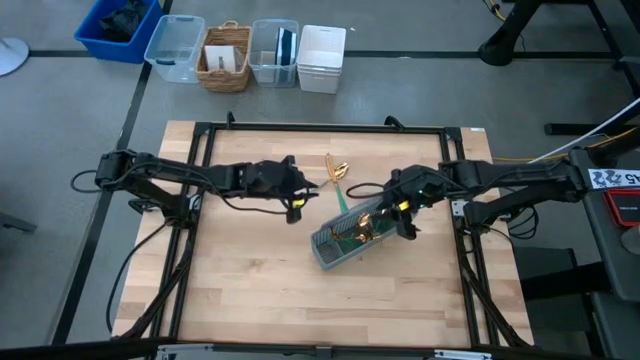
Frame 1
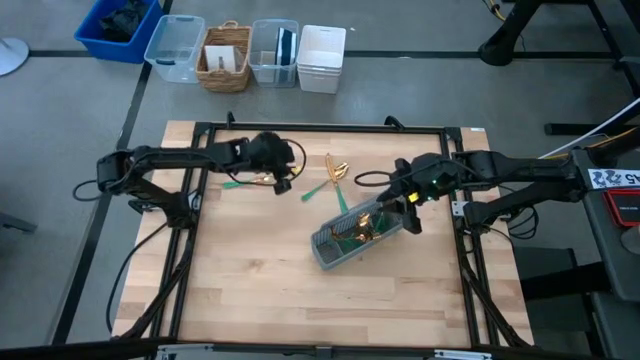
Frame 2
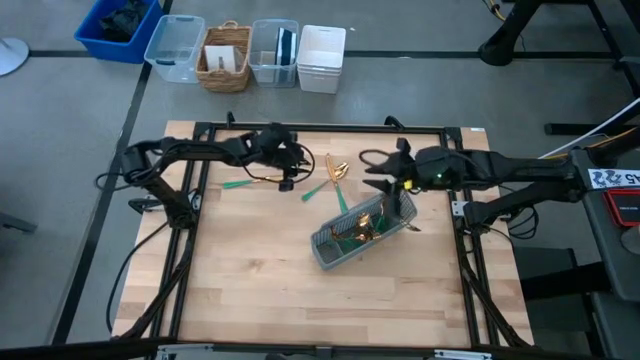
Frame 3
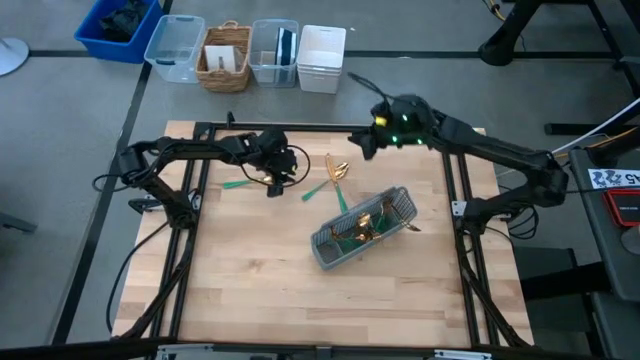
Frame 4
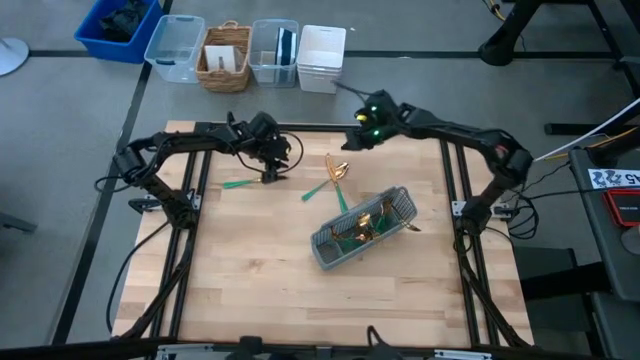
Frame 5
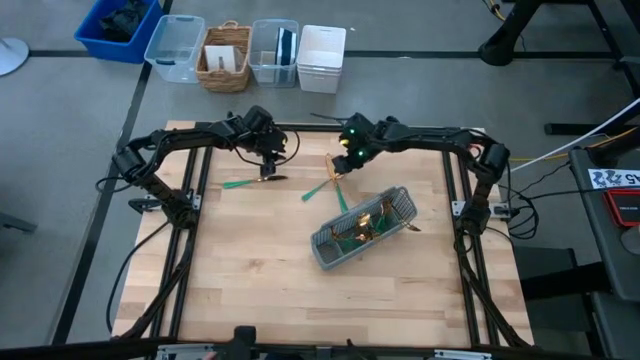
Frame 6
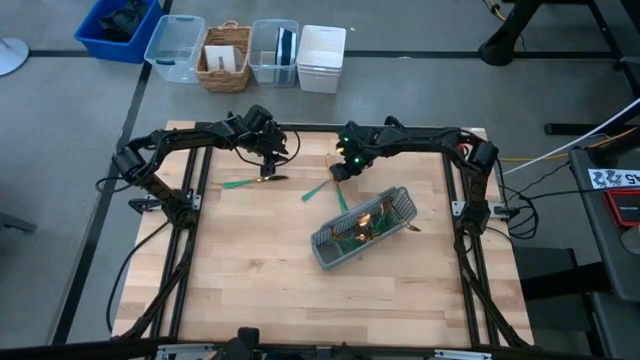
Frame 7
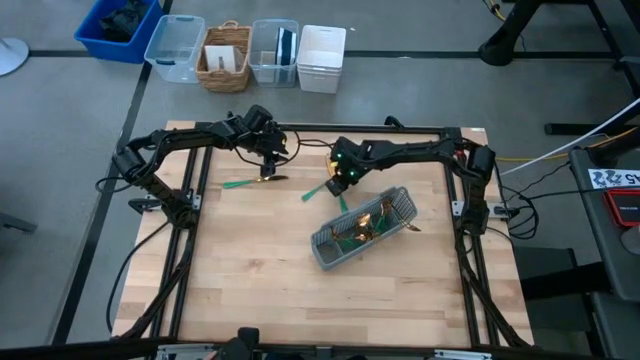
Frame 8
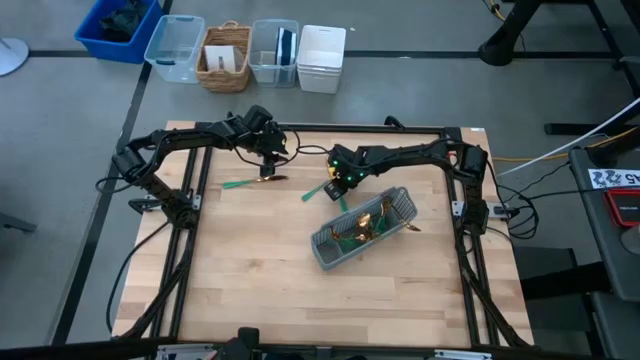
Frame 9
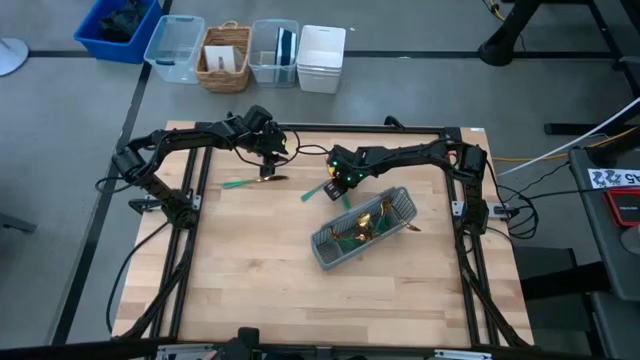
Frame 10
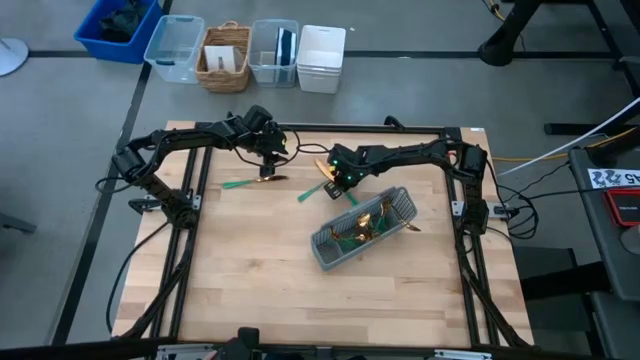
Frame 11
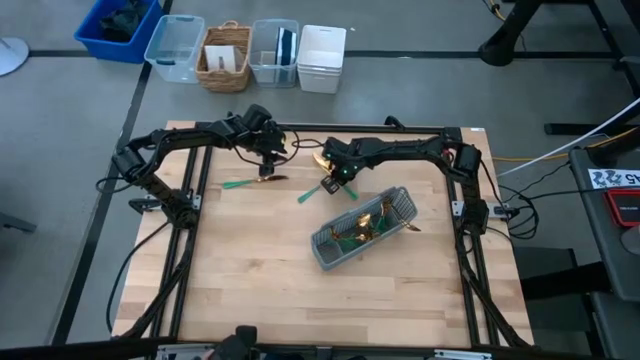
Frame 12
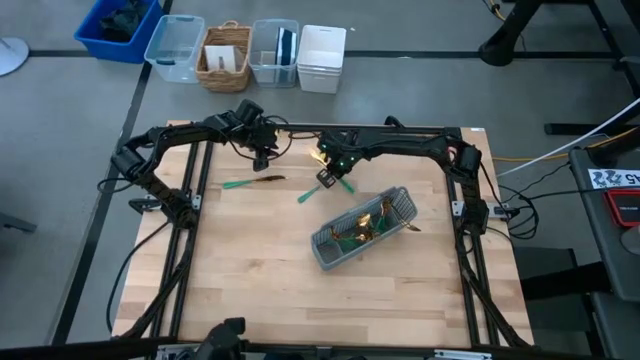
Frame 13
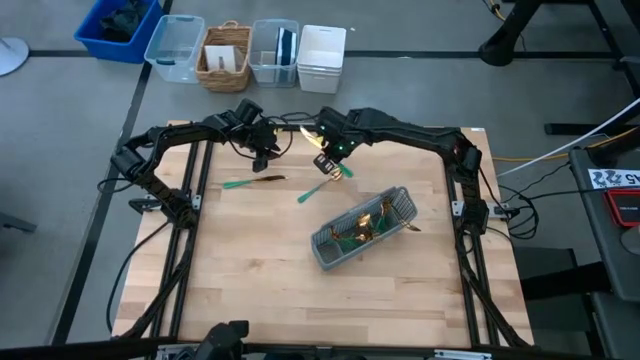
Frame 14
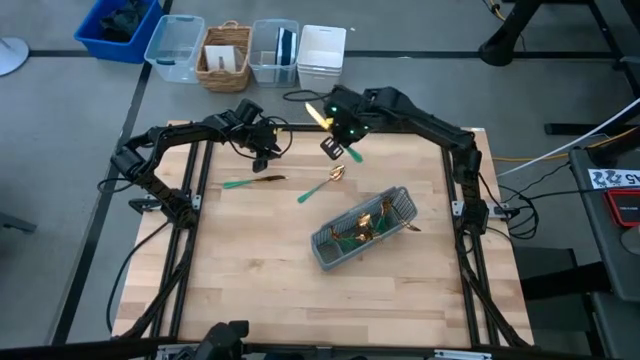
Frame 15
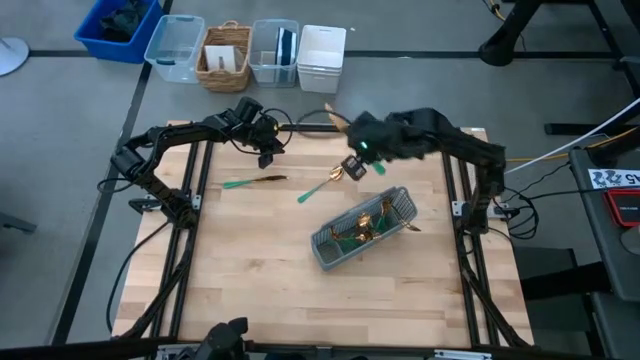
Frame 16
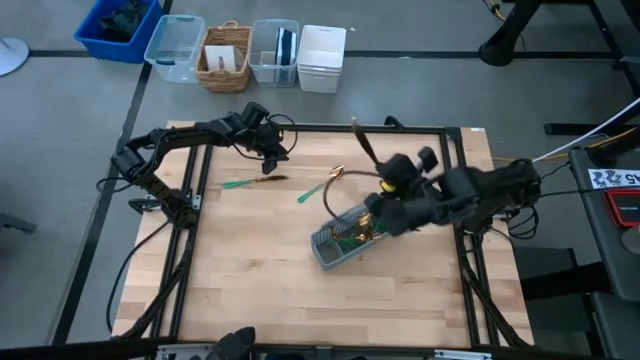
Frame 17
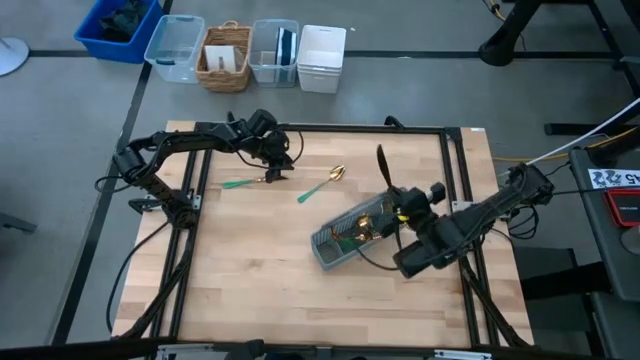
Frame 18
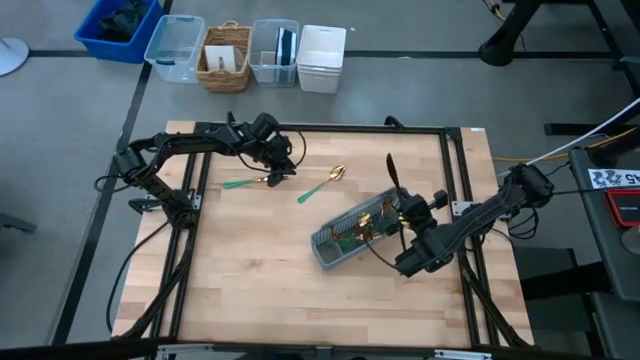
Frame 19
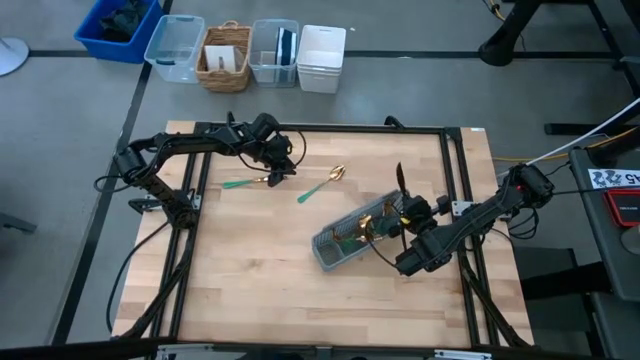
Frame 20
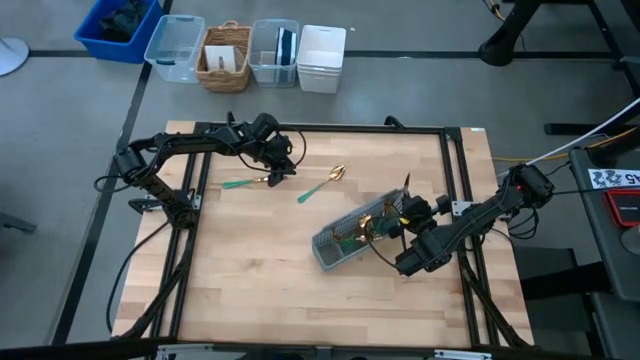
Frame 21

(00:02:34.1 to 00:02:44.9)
Task: Sort silverware
Put the gold knife into the gray silverware organizer

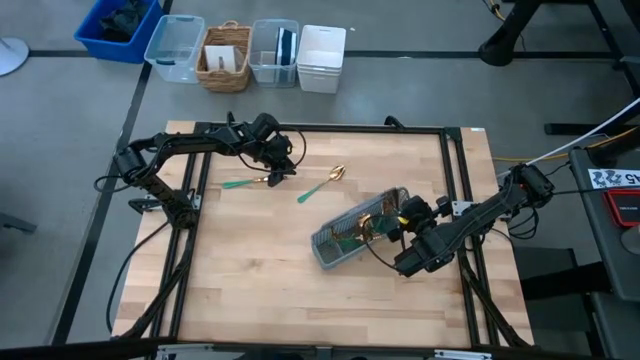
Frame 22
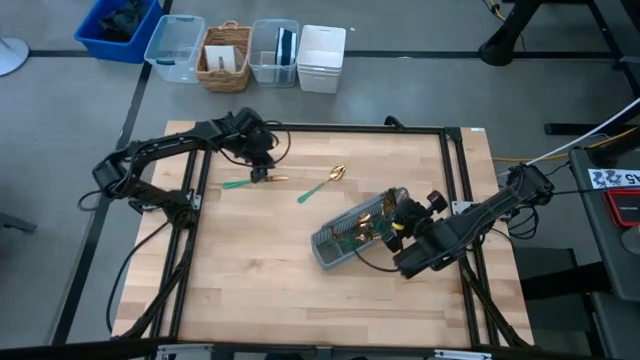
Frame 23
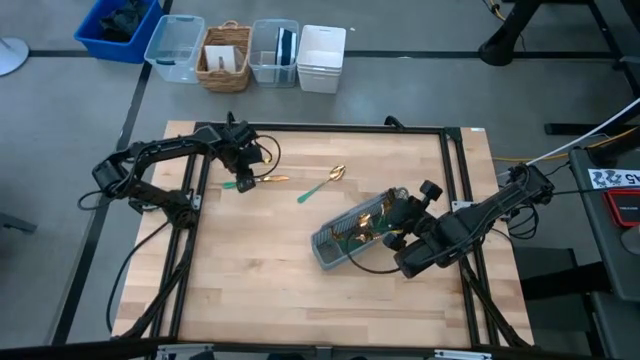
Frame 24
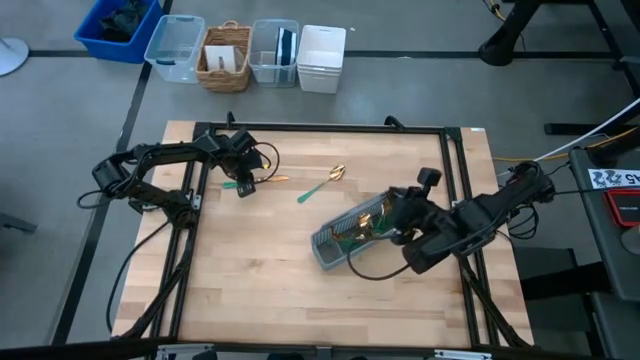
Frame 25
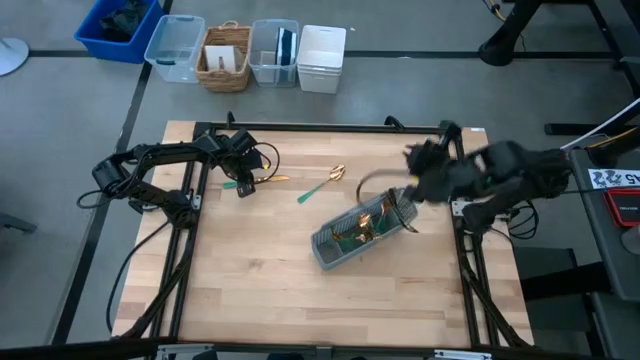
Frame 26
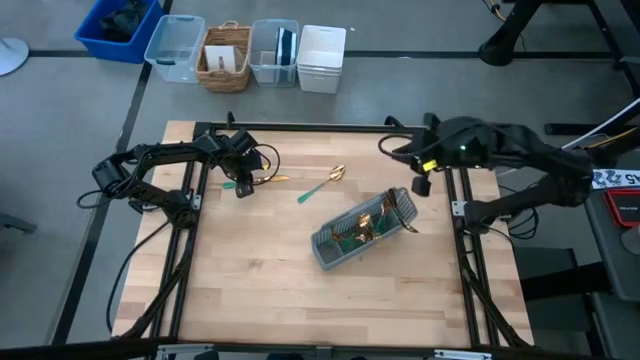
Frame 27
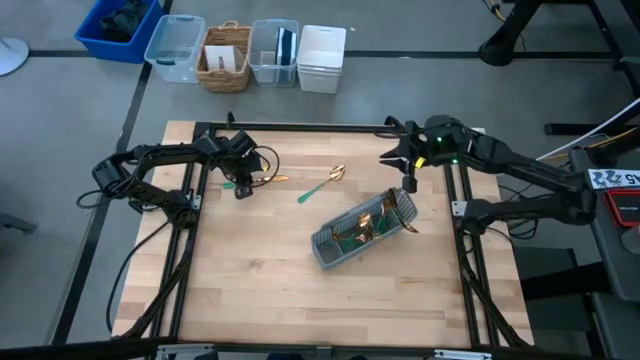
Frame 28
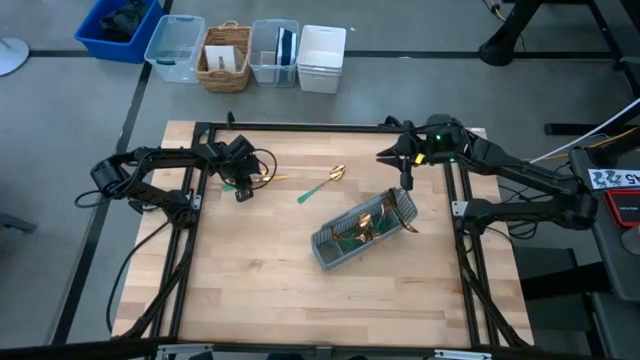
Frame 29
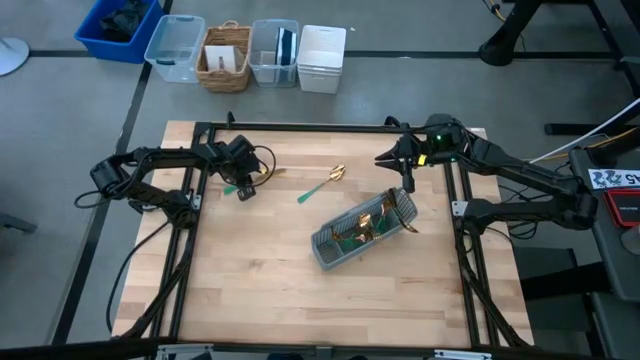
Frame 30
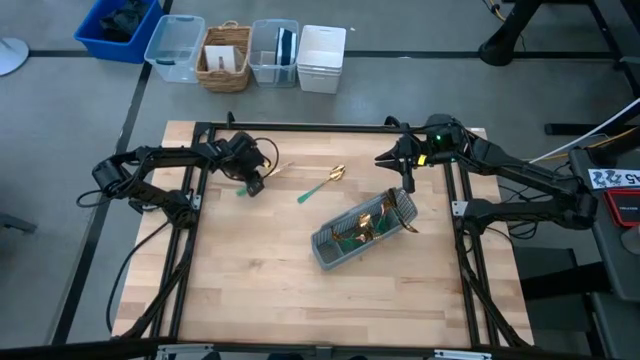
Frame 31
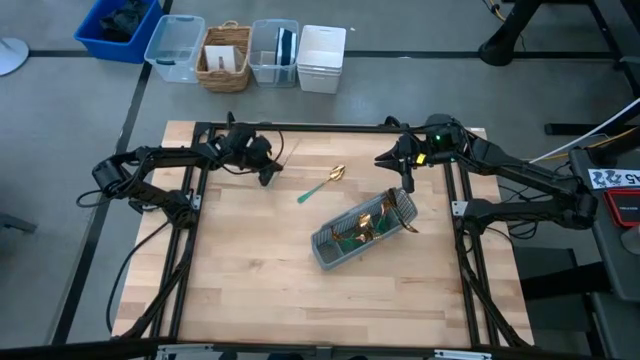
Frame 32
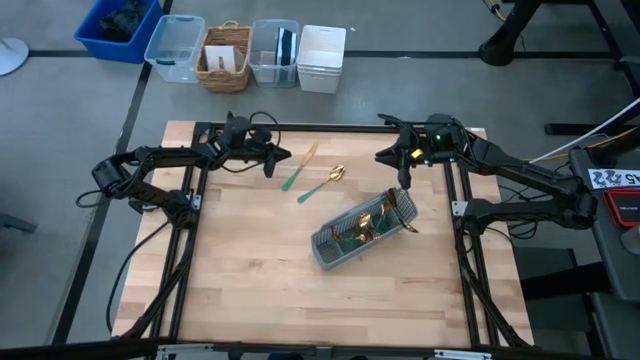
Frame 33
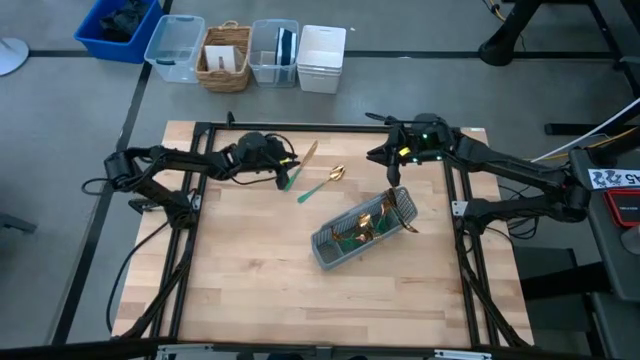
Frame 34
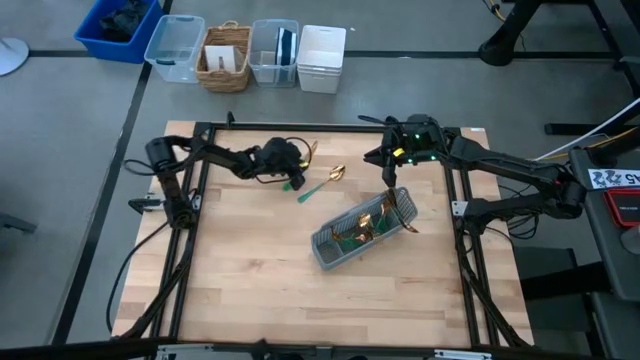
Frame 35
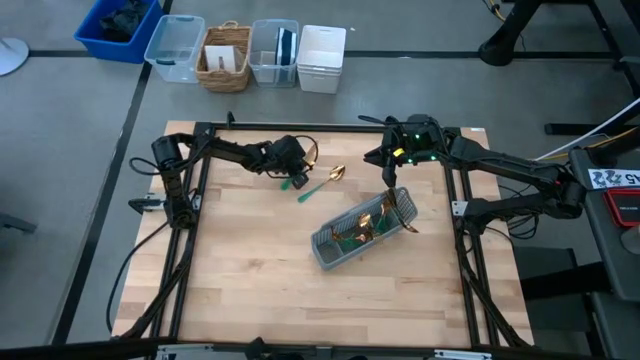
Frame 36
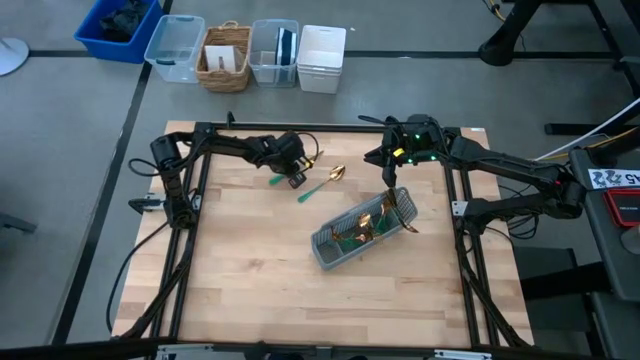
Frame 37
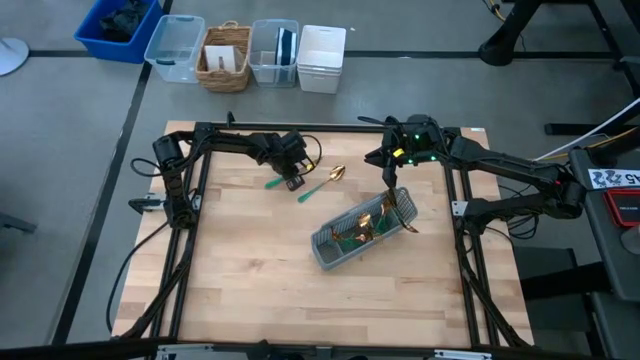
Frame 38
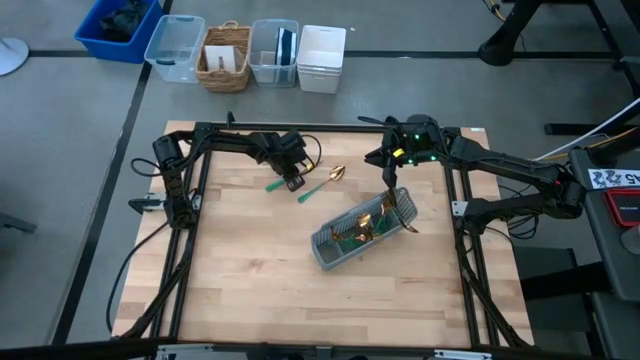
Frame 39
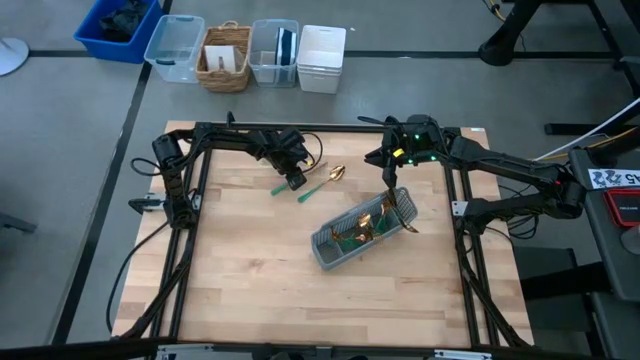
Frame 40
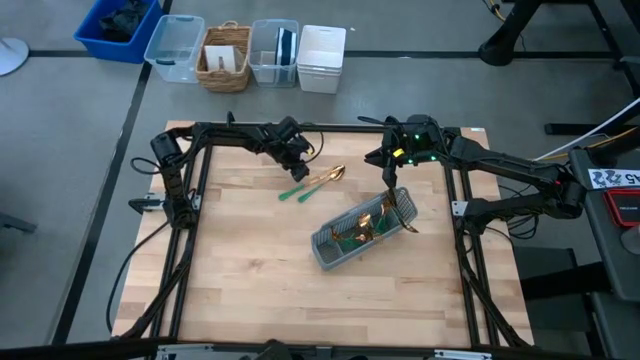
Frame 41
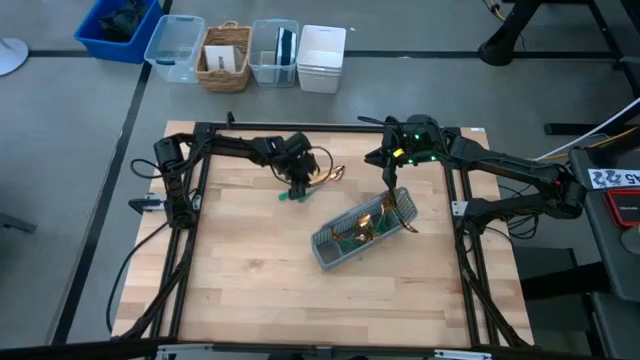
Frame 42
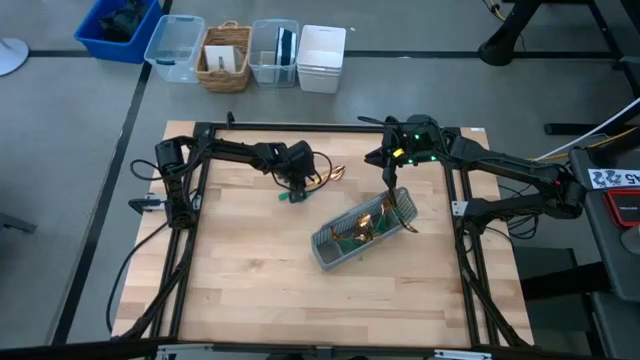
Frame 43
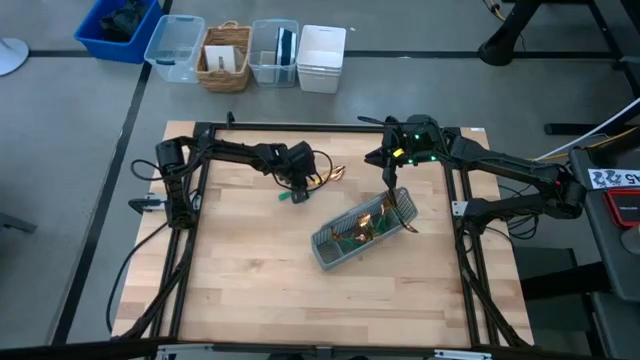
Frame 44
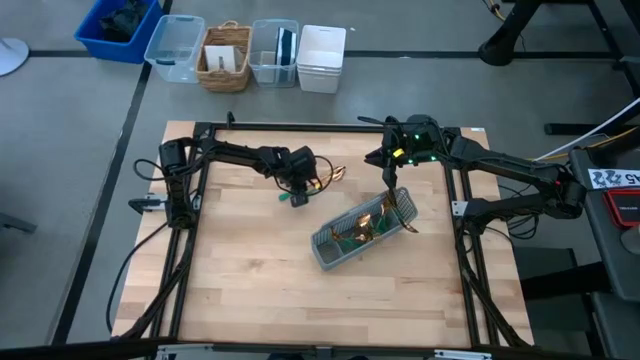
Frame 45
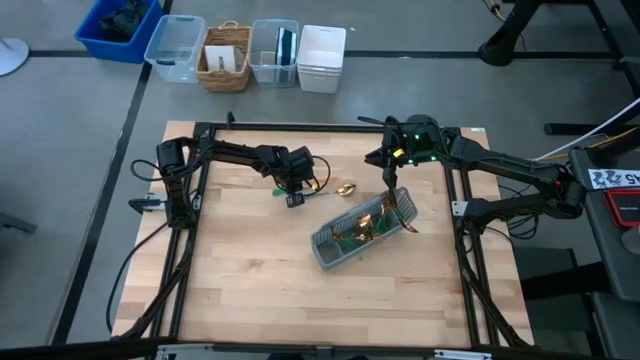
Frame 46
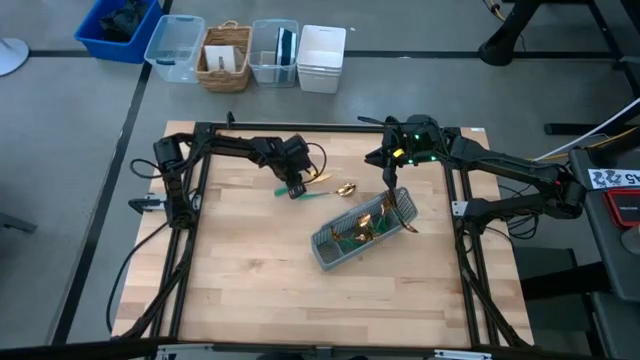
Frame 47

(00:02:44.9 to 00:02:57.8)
Put the knife into the gray silverware organizer
